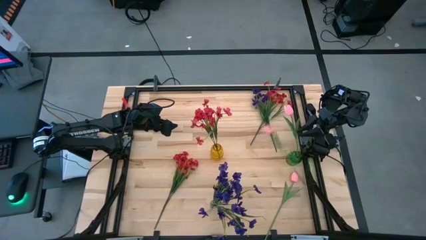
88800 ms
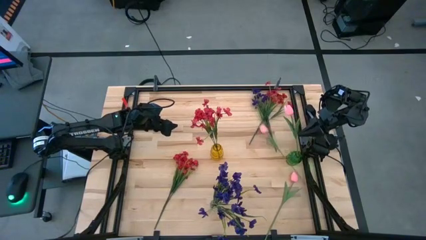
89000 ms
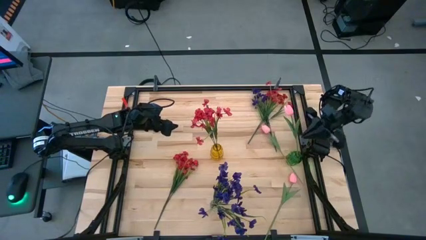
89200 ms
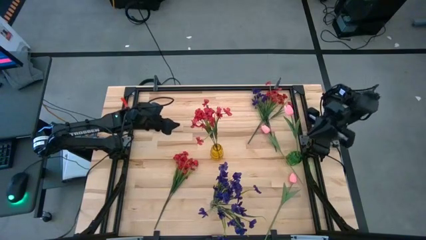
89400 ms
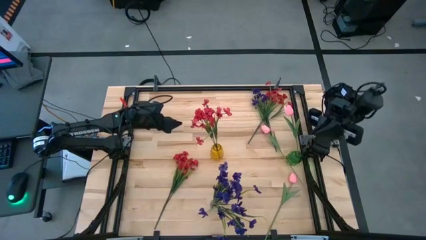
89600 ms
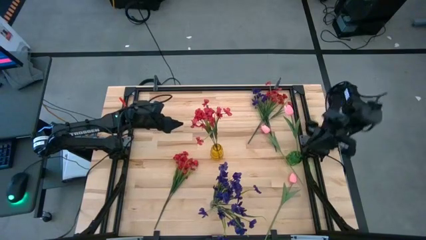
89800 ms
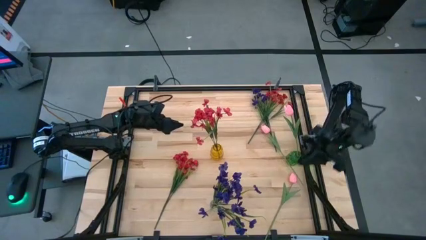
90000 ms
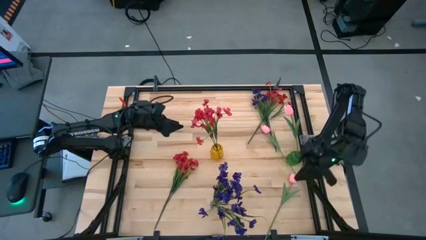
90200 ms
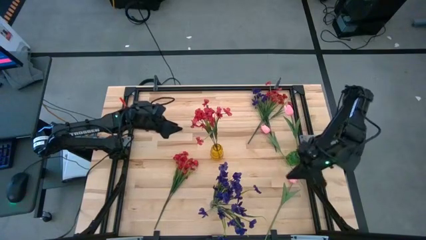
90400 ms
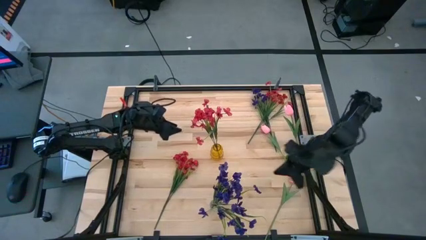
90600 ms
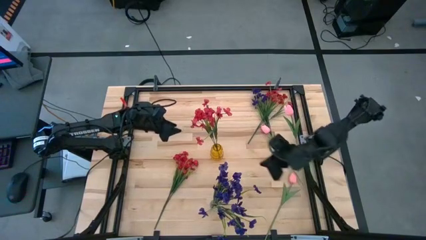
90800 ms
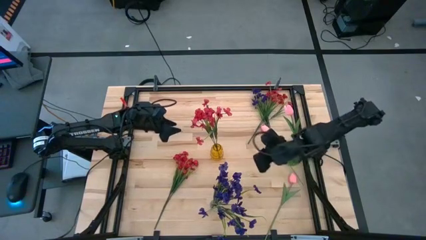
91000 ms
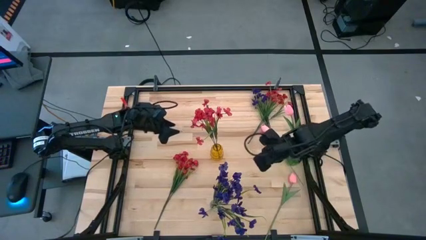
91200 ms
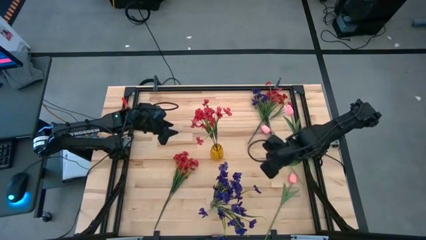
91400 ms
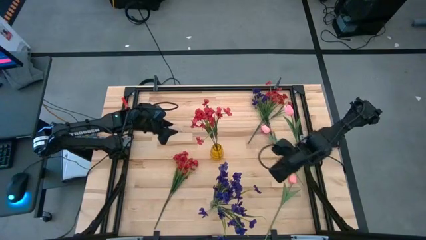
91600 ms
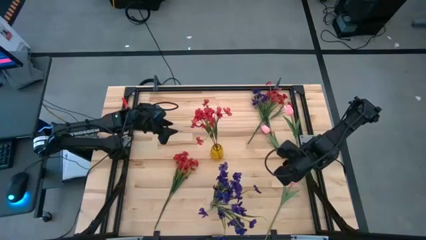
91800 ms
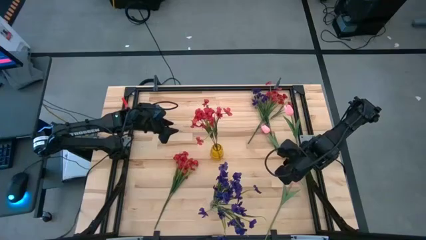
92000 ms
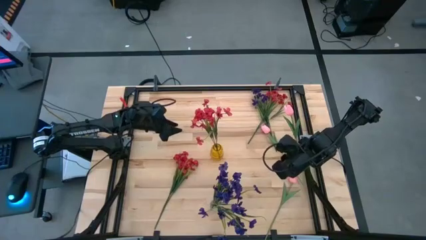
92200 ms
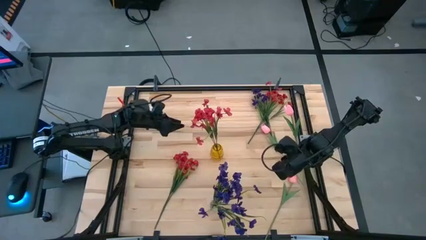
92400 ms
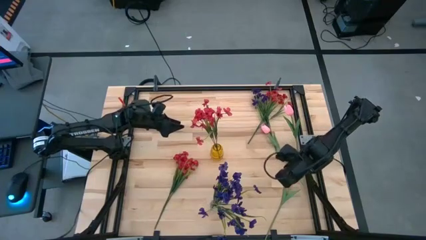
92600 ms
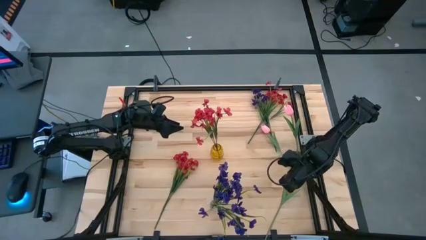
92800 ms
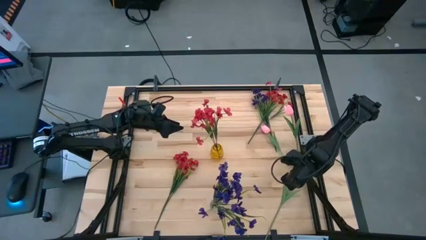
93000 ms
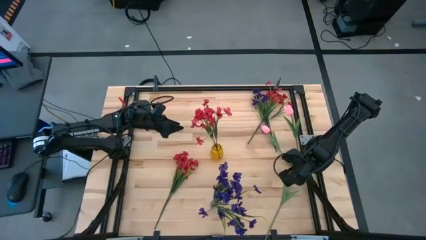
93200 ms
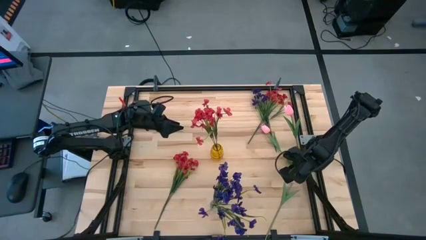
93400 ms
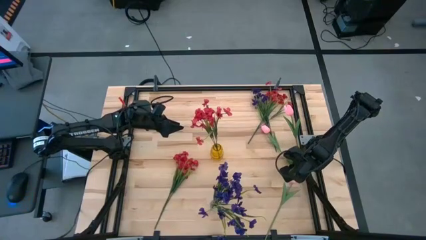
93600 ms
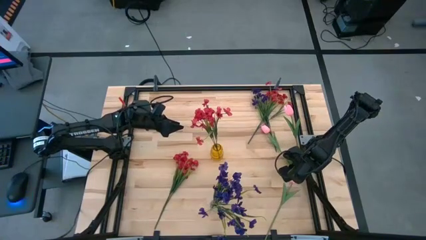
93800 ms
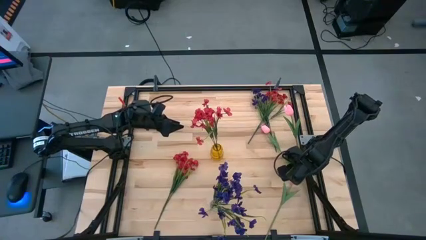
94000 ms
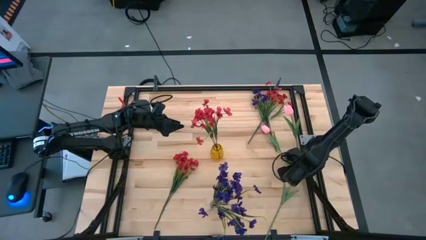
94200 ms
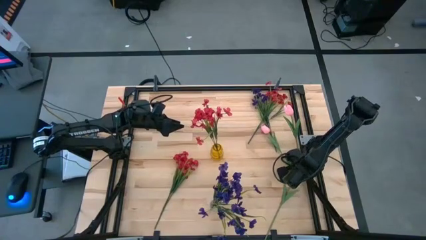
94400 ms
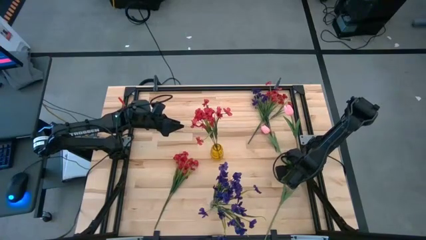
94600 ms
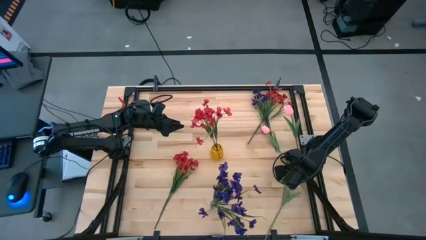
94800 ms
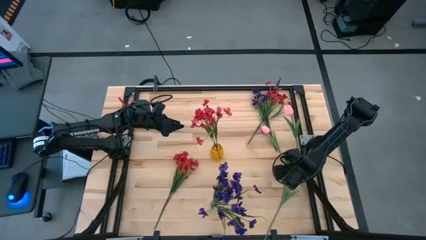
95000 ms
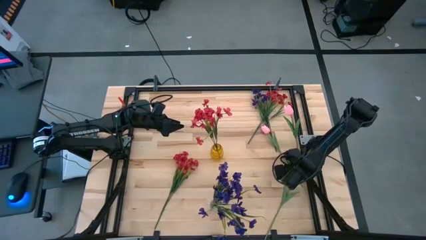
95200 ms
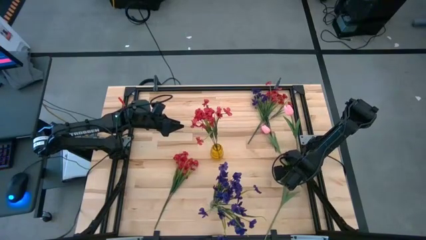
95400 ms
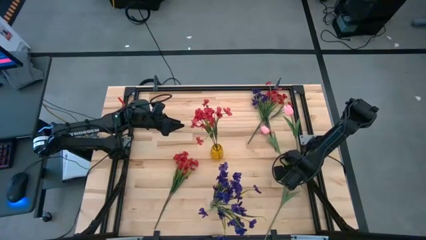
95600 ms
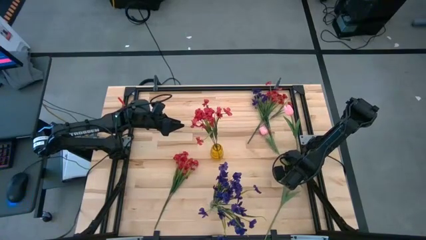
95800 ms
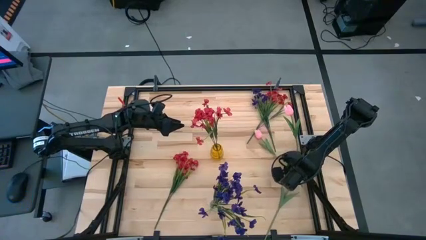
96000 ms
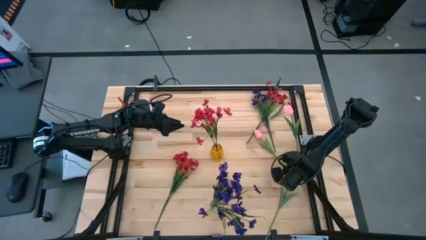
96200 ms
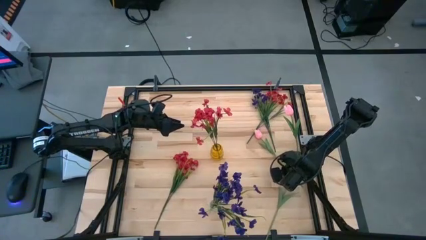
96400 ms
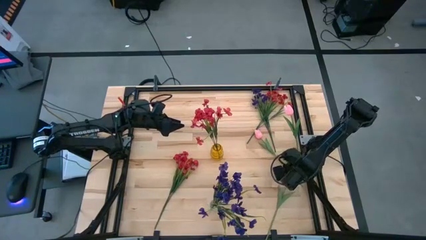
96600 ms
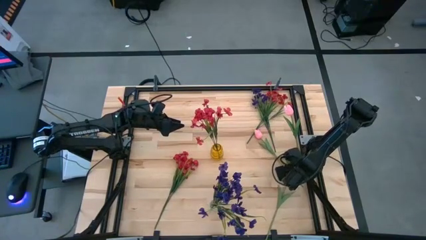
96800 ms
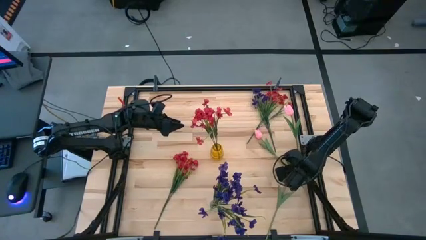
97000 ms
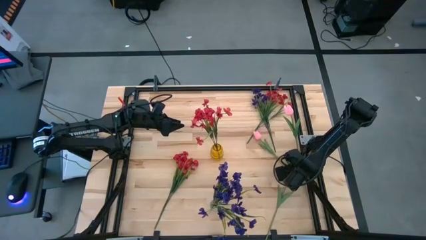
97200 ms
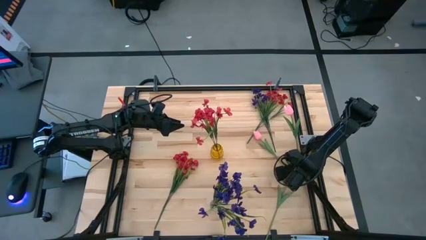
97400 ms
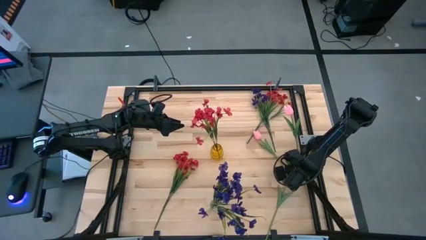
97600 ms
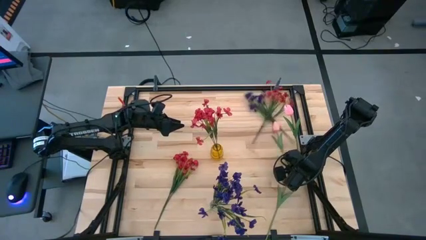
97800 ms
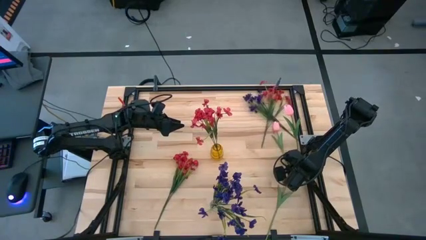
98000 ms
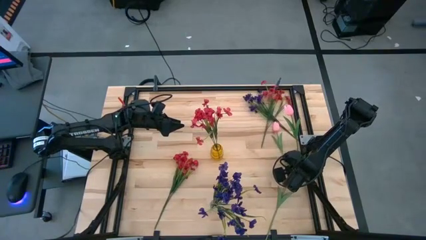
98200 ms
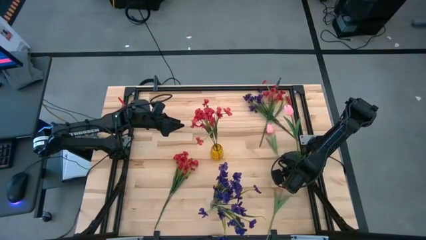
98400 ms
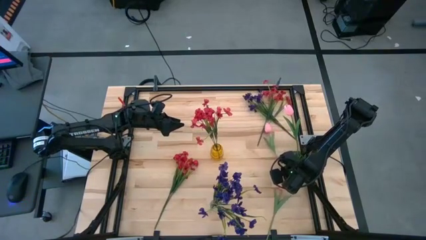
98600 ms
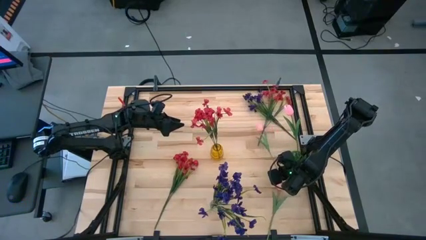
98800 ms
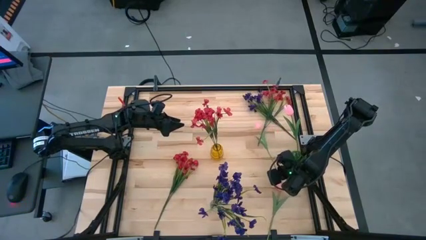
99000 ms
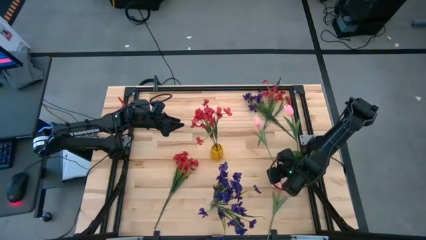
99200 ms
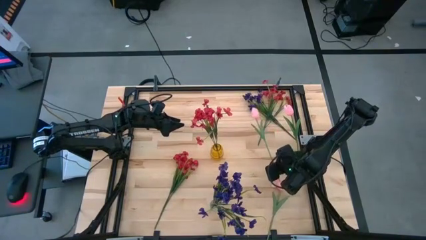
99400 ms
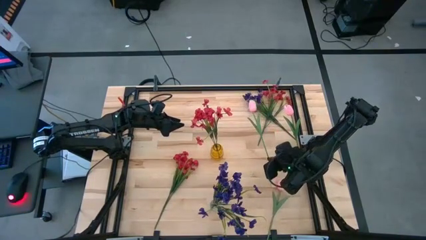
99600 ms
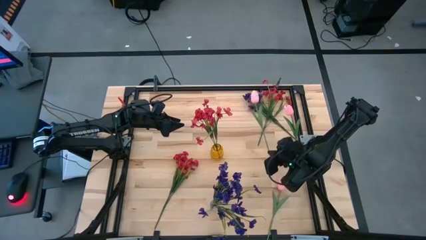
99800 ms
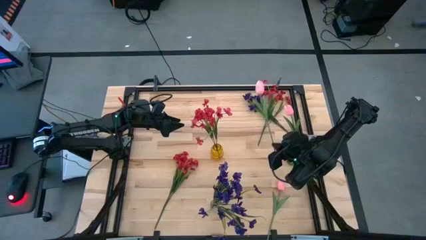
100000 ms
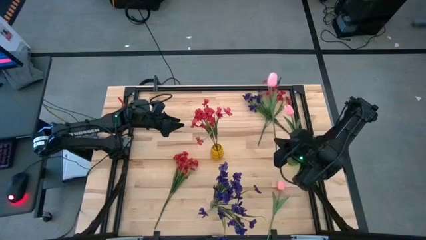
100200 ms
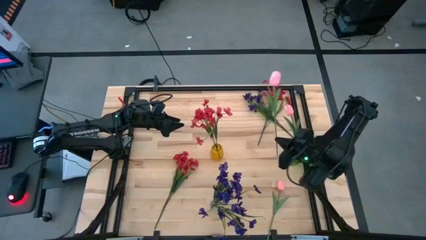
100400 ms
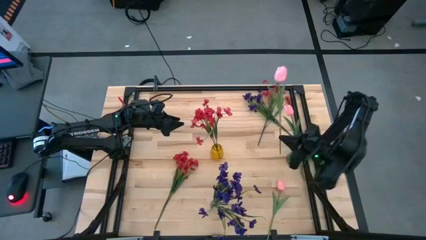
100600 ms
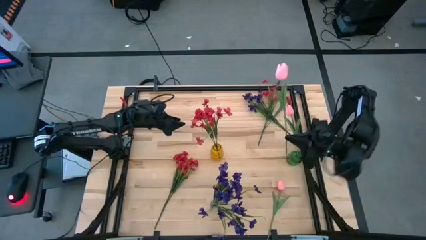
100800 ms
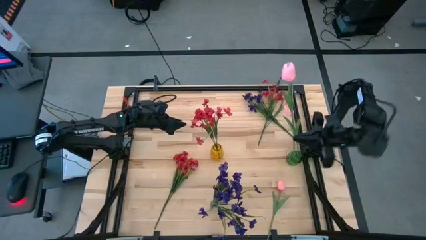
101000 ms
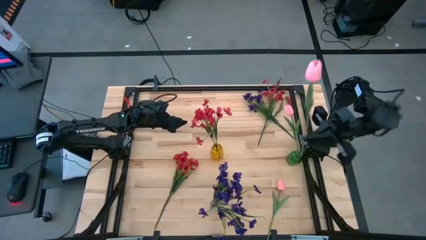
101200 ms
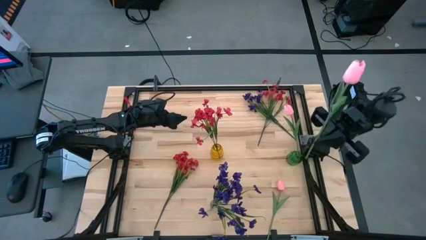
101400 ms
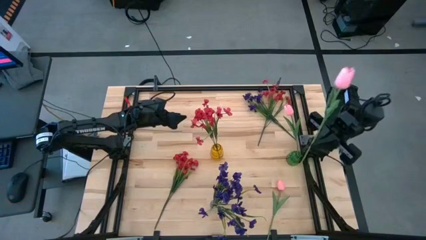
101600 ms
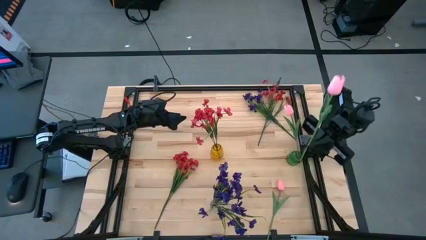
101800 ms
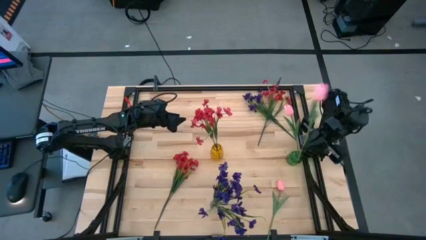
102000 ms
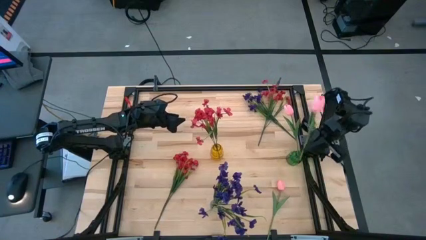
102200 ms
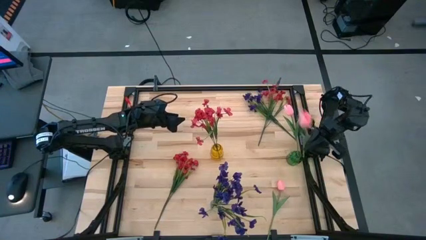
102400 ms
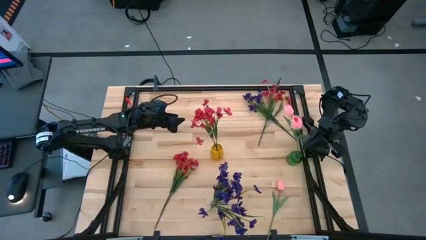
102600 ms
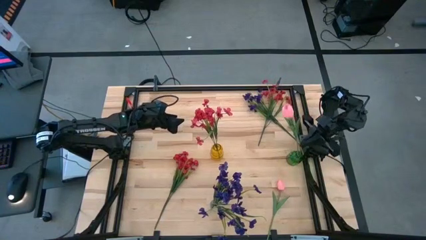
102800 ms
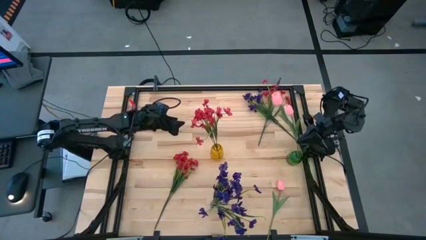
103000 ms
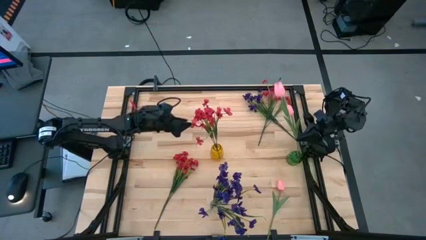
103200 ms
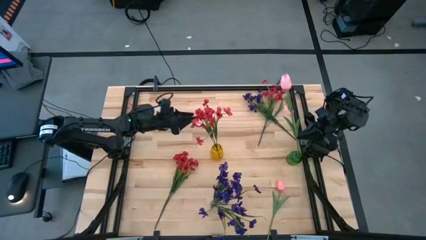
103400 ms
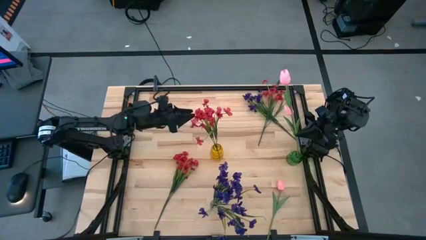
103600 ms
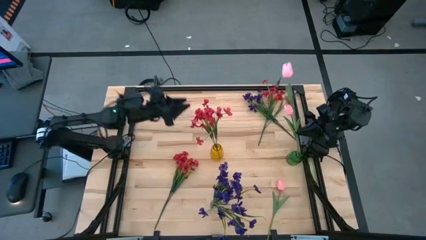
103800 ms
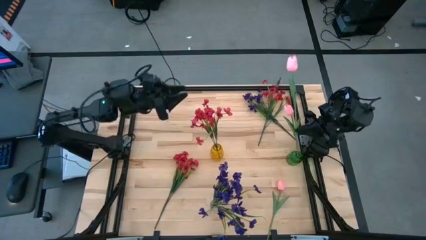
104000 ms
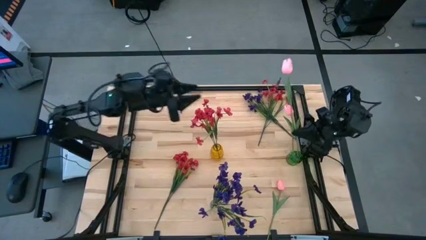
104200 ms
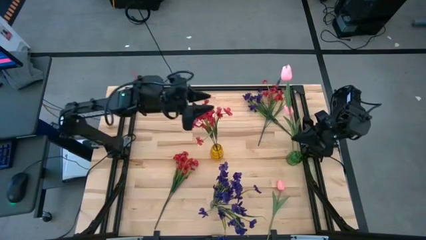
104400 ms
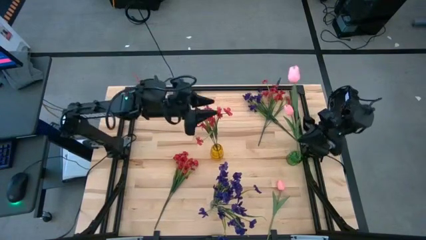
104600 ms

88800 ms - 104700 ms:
Task: Sort flowers into vase by color
Put the bottom left pink tulip into the green vase
